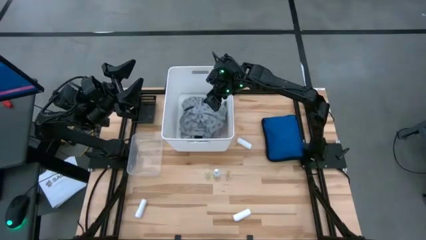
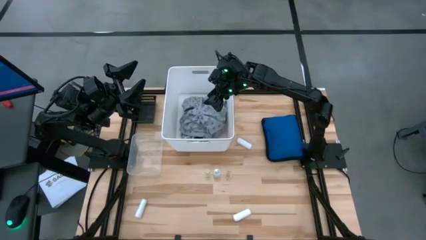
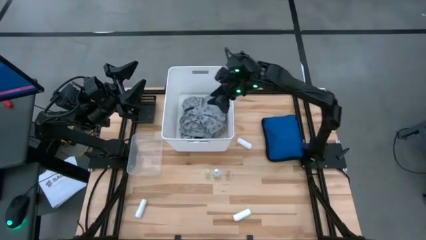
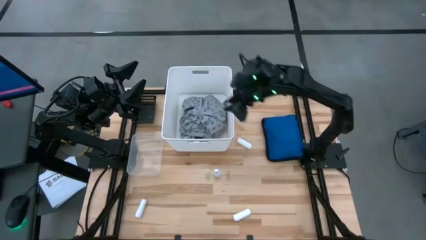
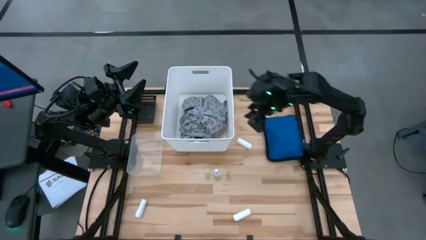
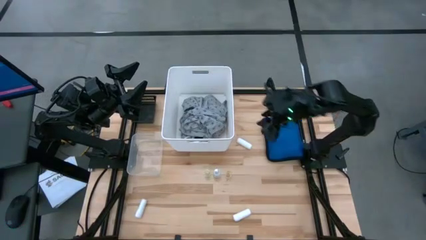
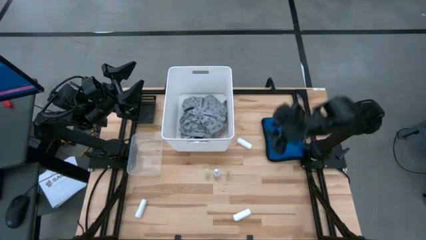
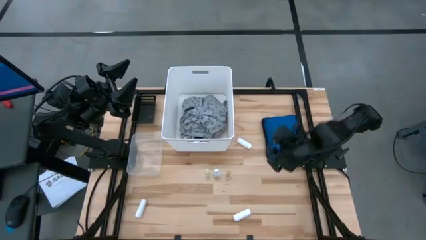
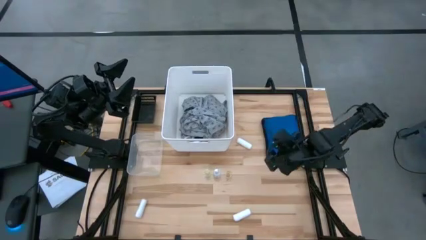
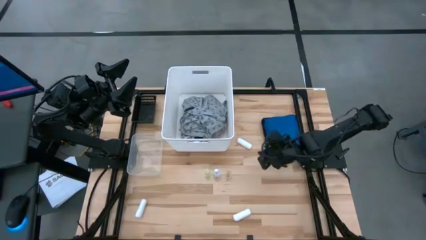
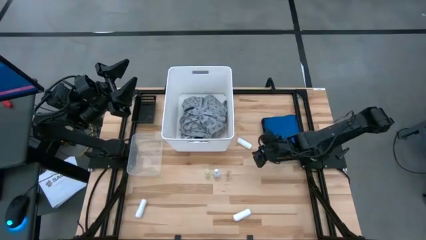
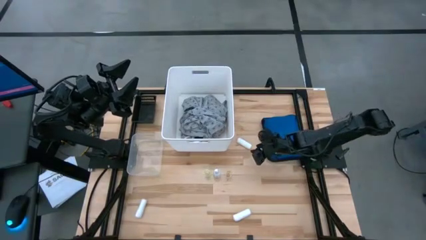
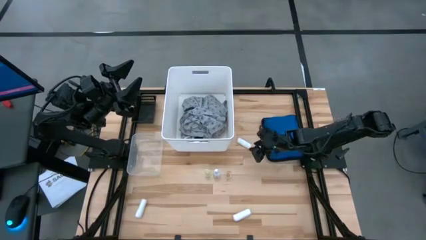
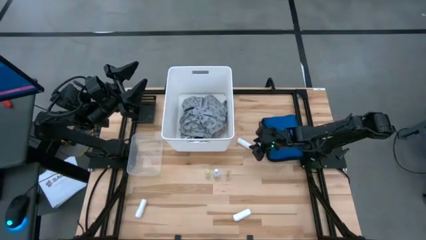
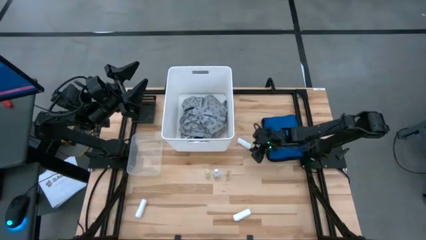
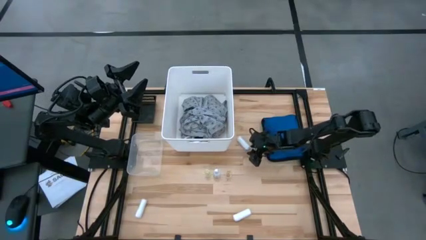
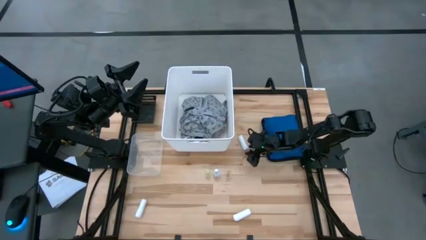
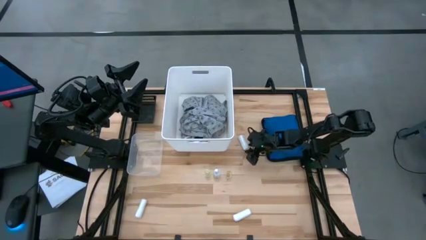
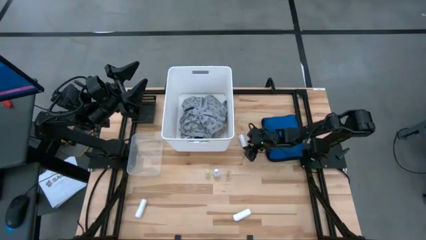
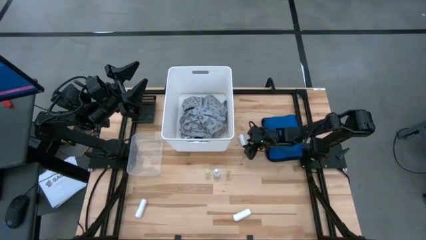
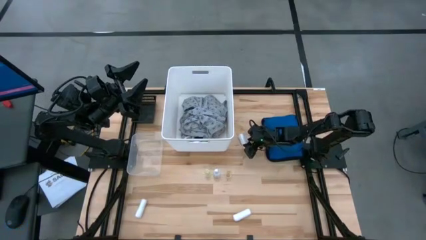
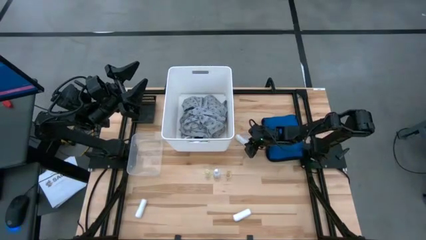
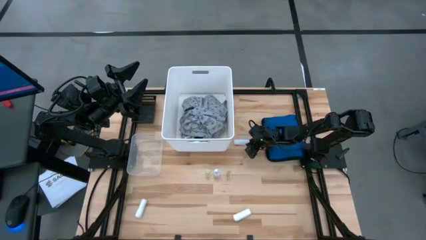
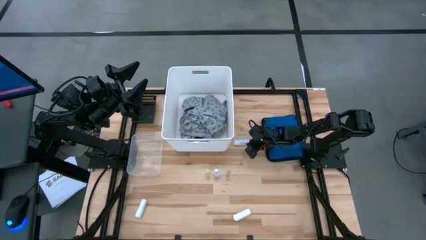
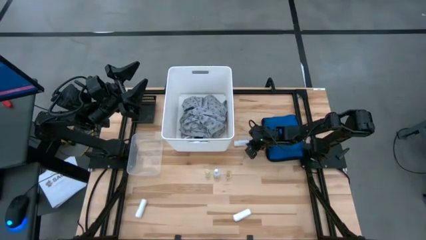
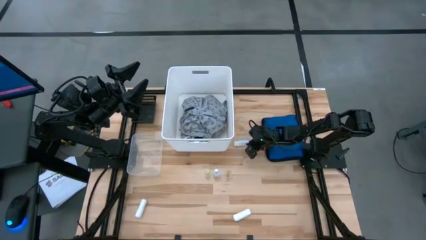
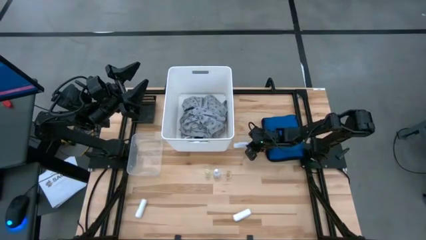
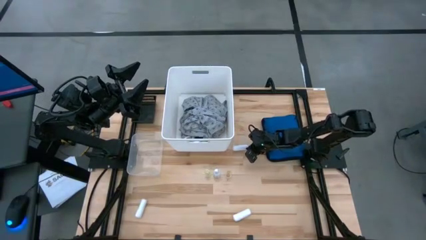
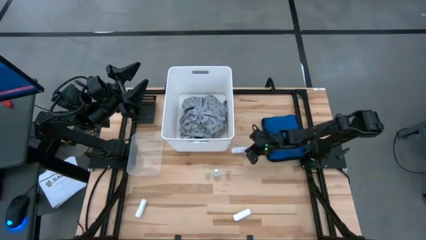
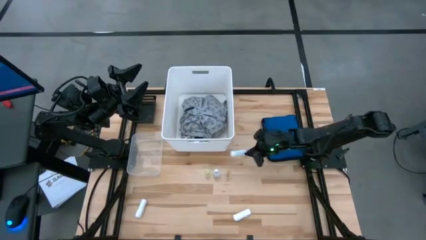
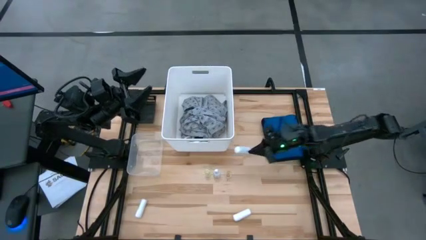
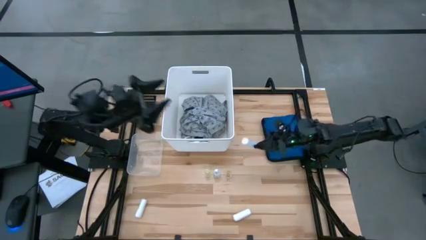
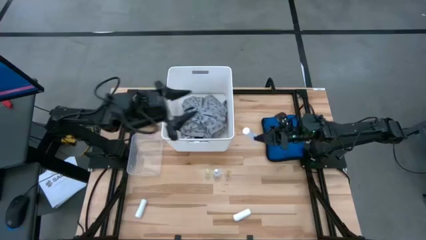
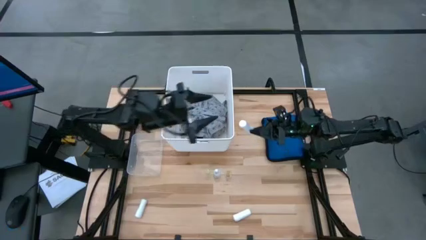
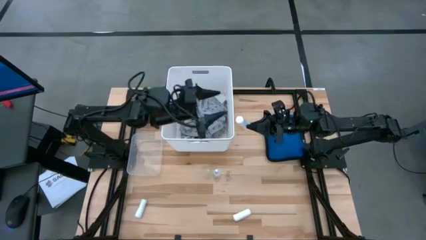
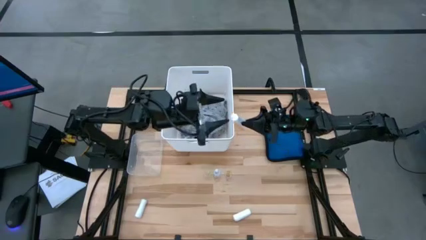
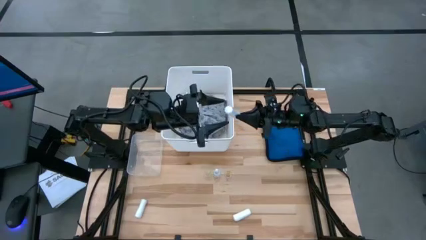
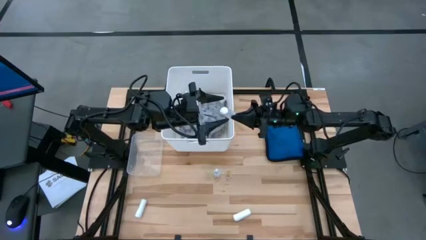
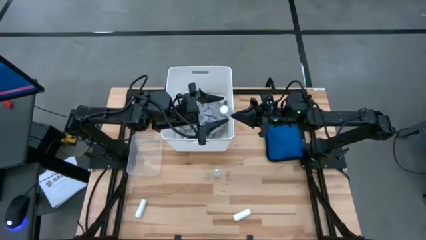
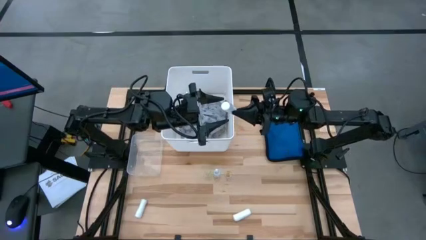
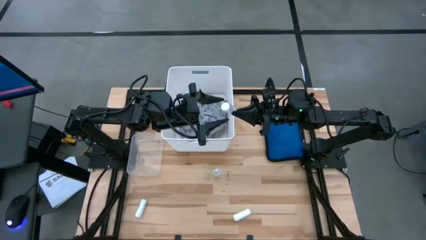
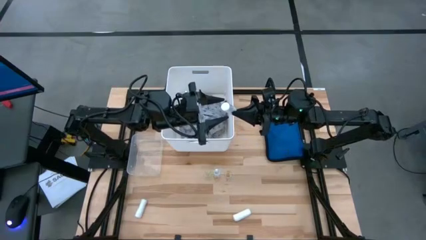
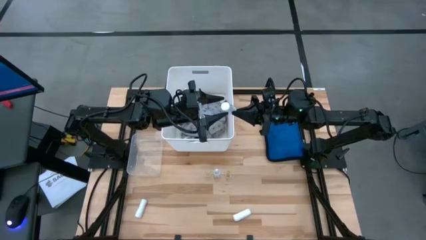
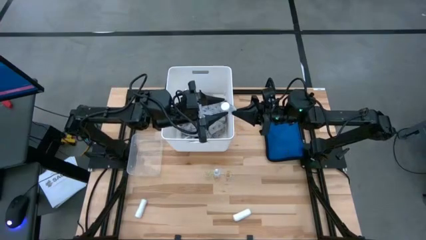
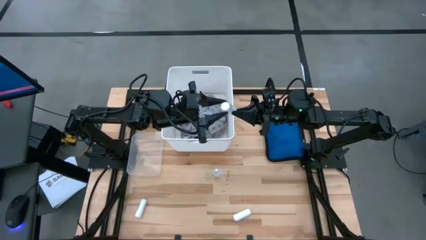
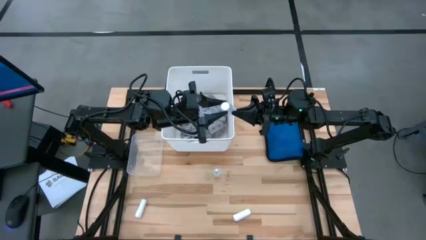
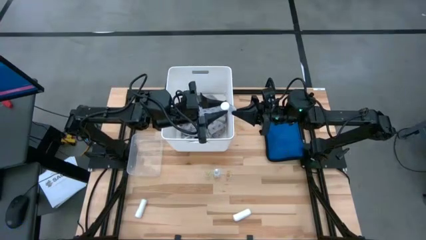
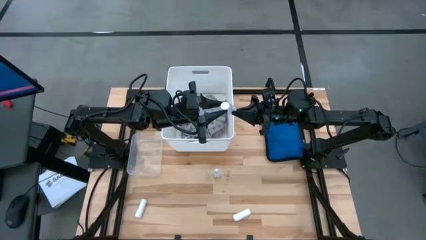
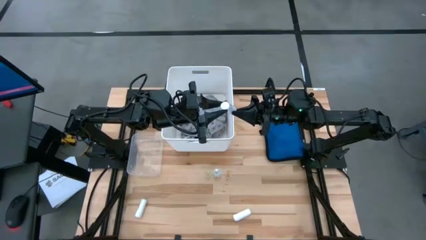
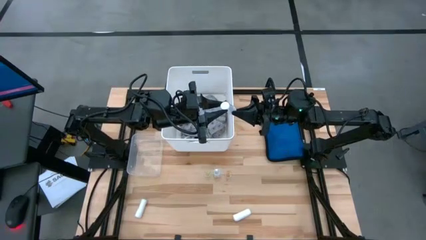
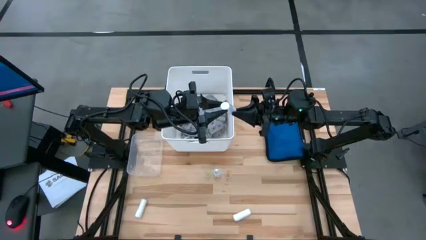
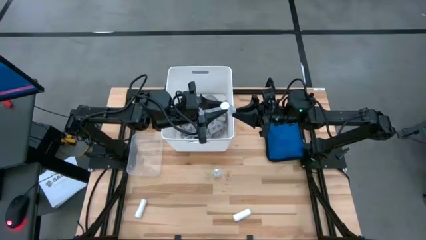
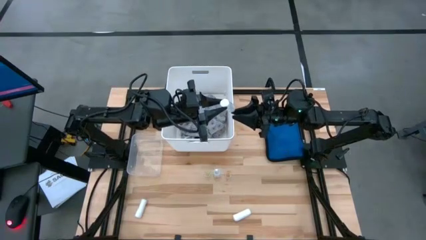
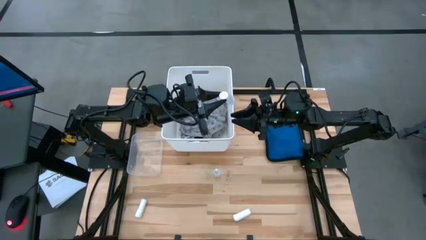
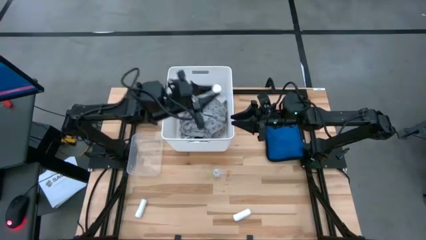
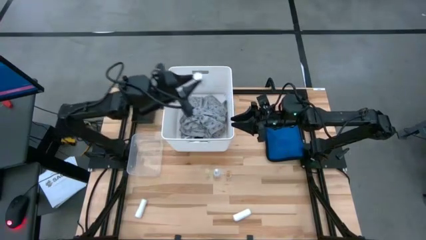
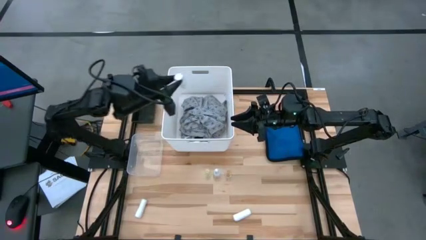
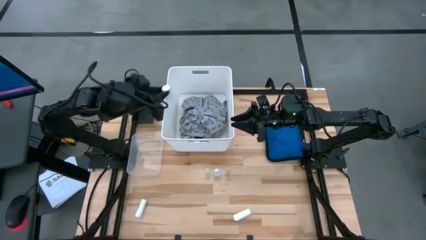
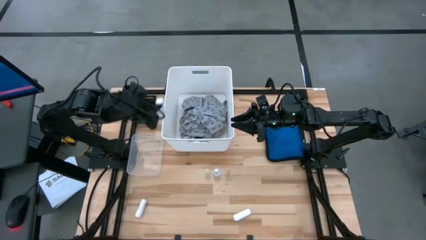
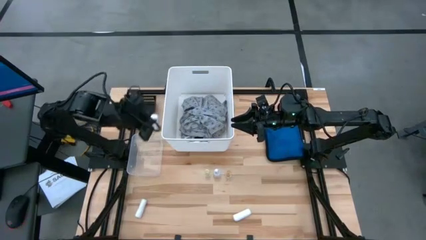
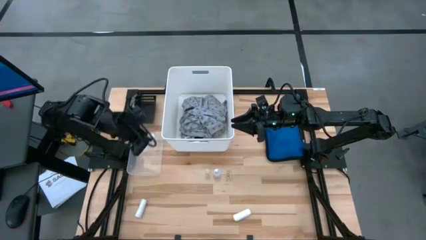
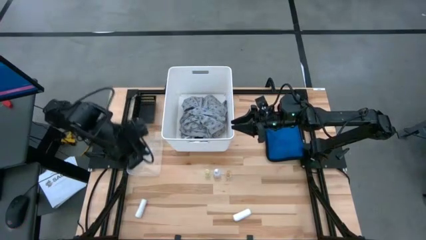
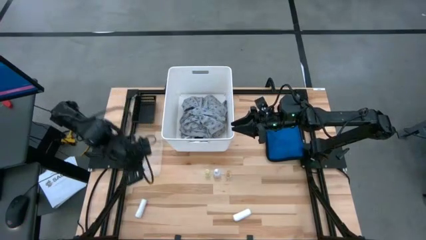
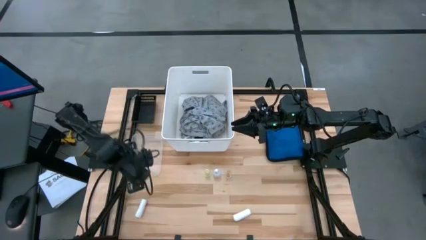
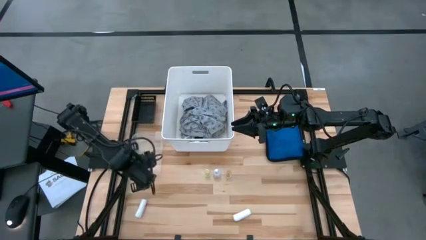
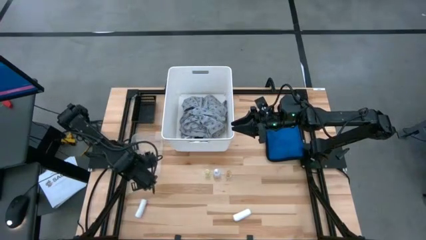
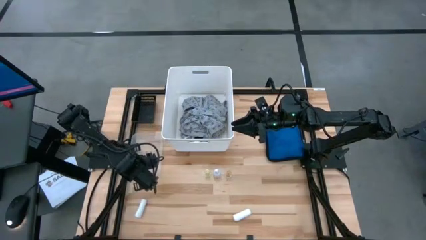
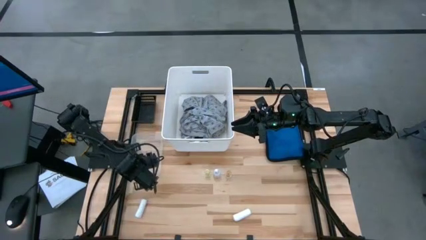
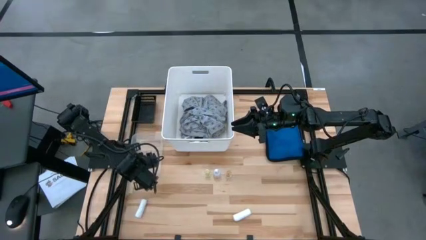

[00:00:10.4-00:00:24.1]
Task: Pick & Place Medicine items
Put the top right rolled gauze into the transparent bin

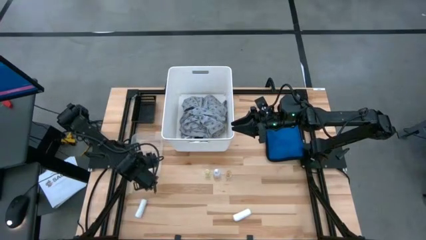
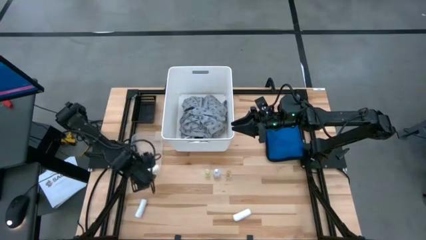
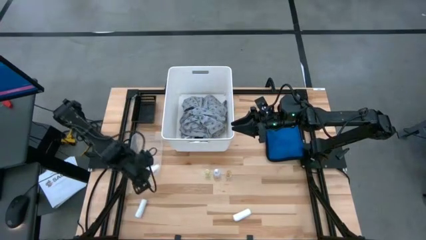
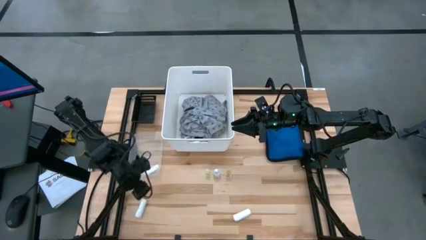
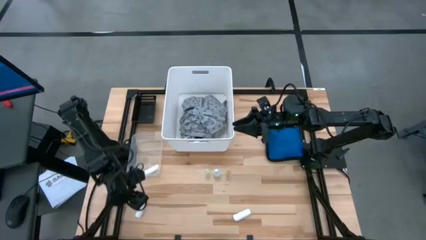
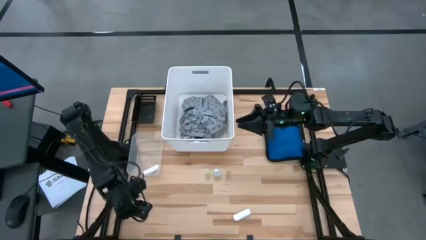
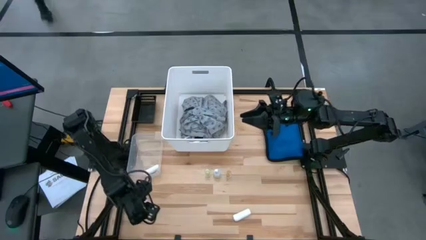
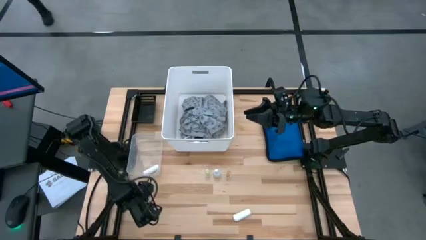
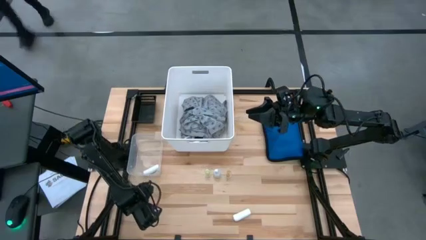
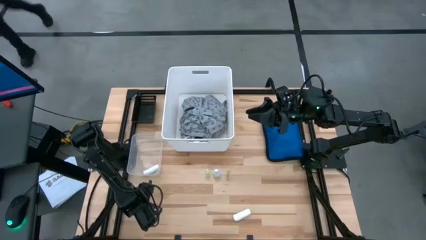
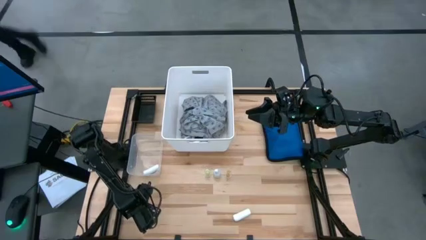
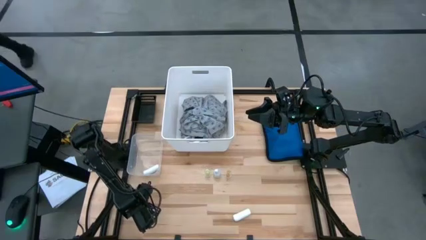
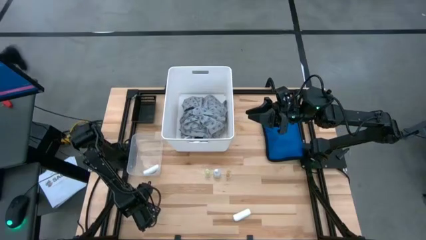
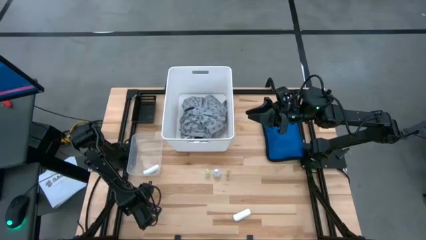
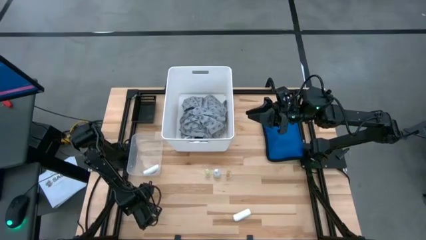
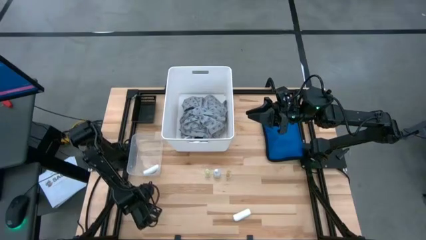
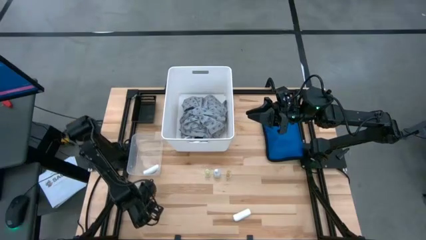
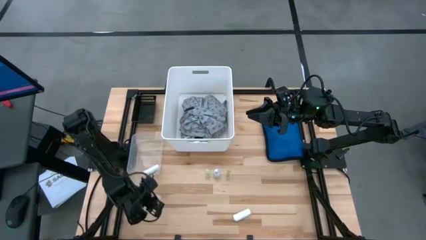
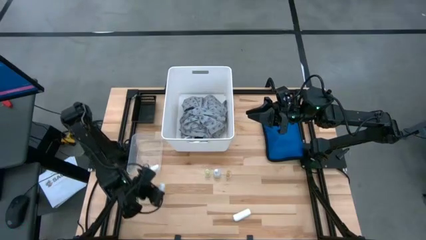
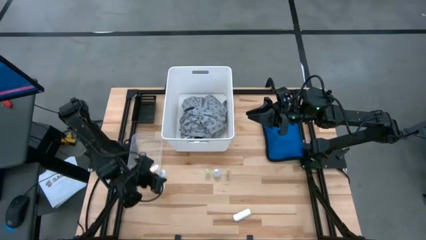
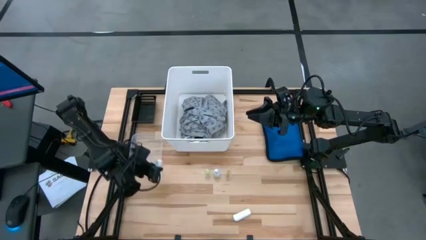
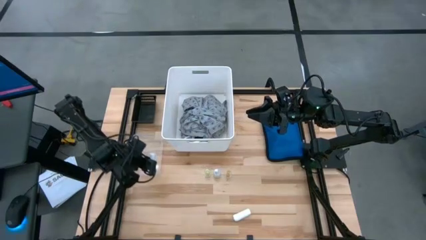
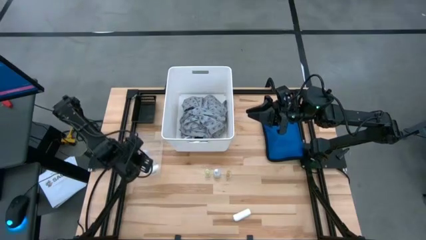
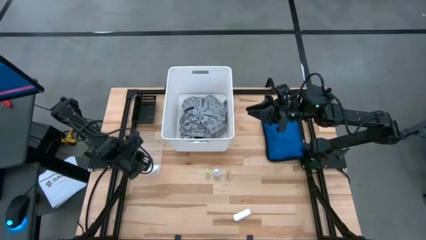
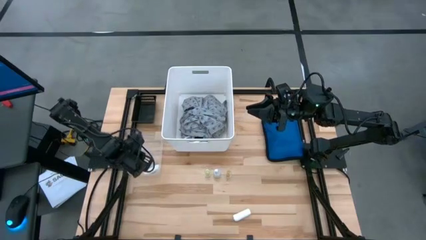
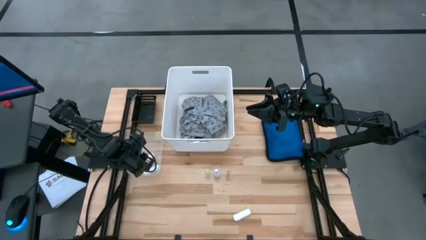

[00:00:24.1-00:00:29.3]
Put the left rolled gauze into the transparent bin
